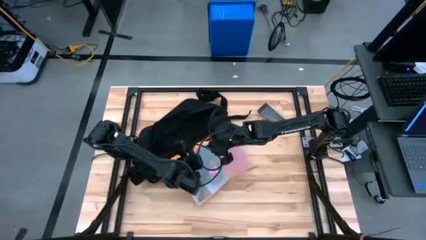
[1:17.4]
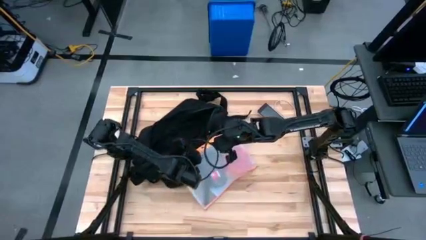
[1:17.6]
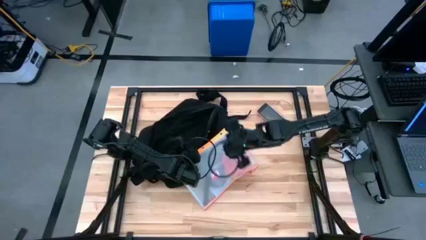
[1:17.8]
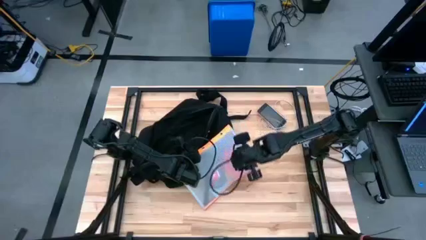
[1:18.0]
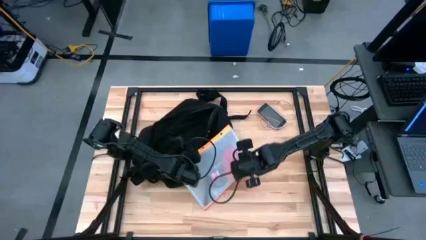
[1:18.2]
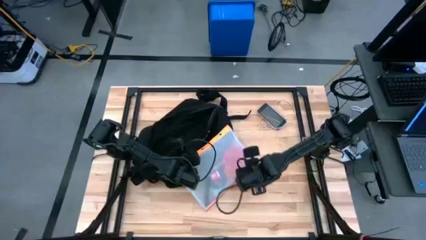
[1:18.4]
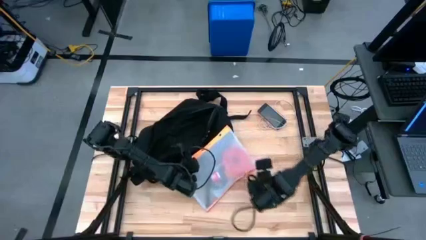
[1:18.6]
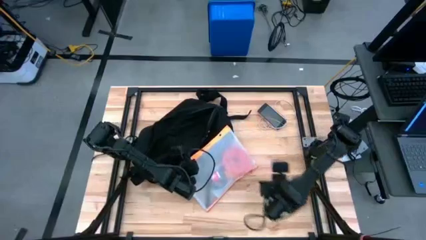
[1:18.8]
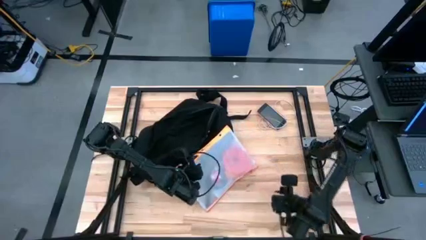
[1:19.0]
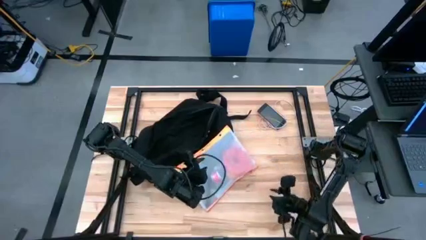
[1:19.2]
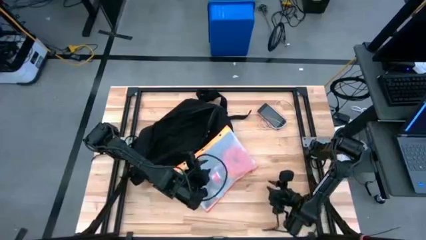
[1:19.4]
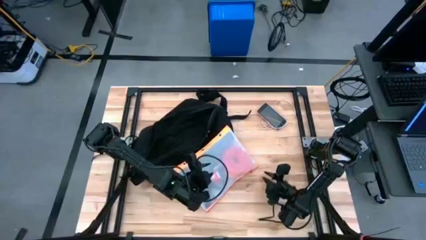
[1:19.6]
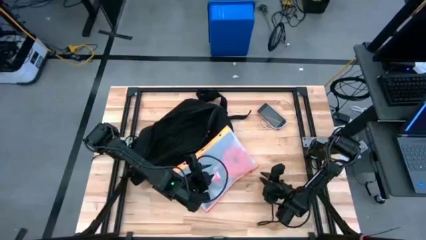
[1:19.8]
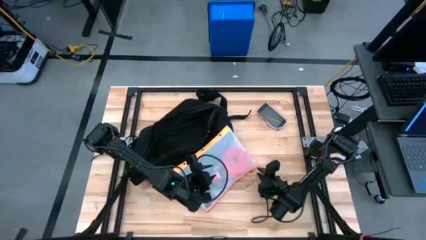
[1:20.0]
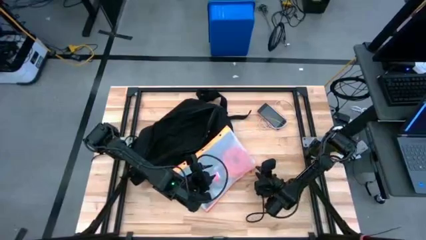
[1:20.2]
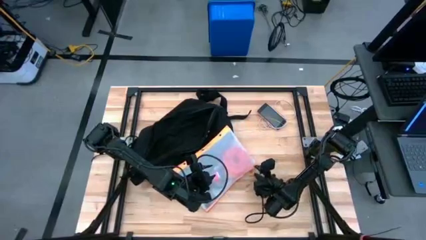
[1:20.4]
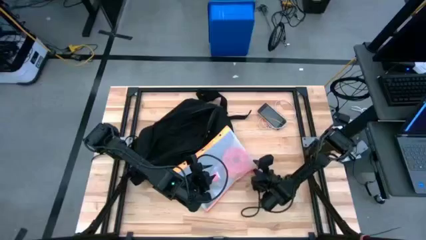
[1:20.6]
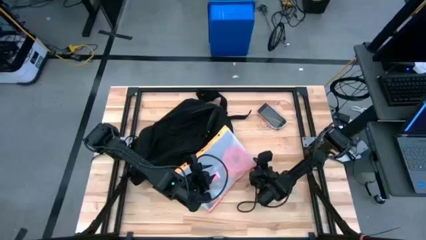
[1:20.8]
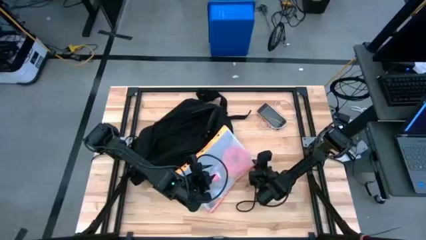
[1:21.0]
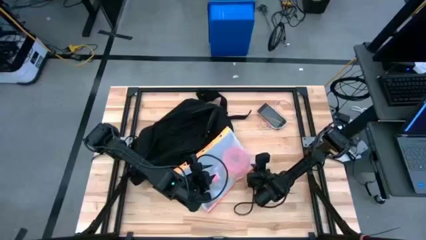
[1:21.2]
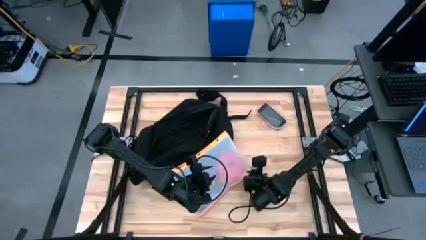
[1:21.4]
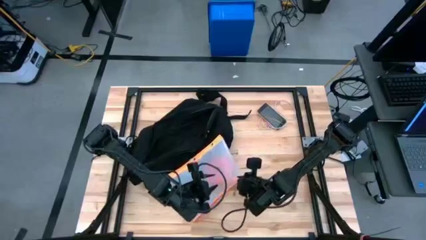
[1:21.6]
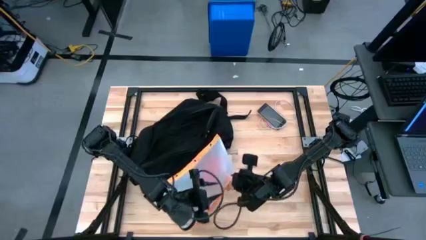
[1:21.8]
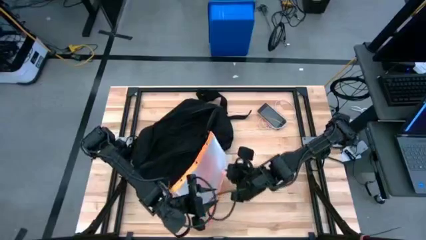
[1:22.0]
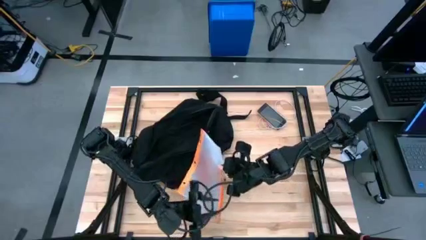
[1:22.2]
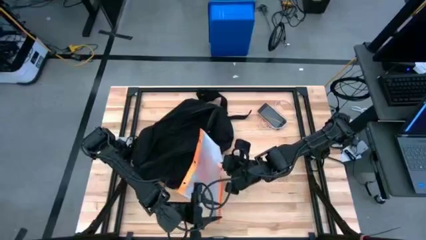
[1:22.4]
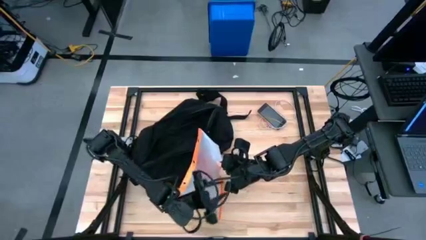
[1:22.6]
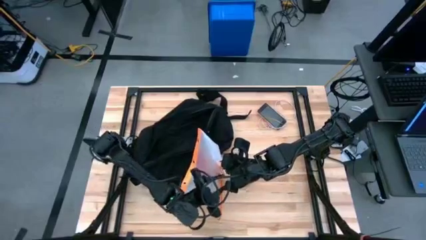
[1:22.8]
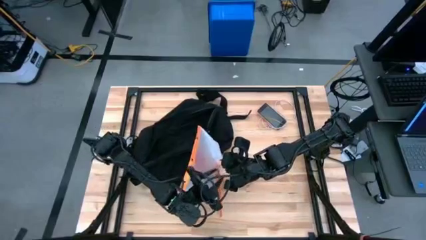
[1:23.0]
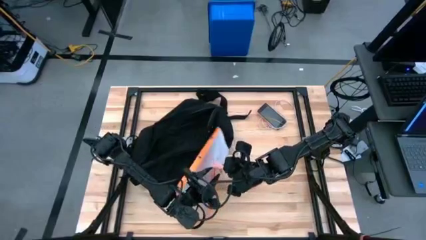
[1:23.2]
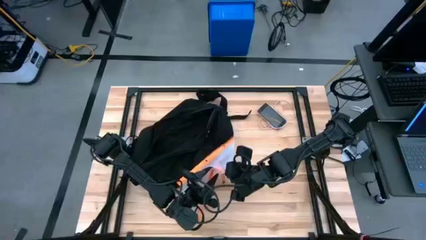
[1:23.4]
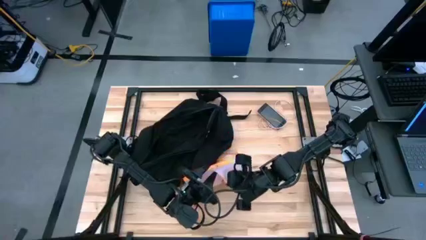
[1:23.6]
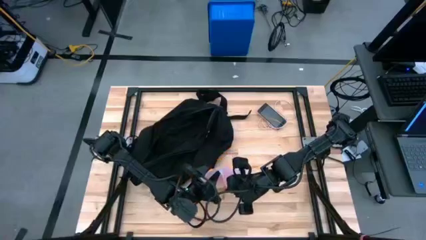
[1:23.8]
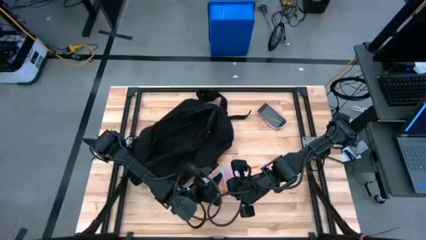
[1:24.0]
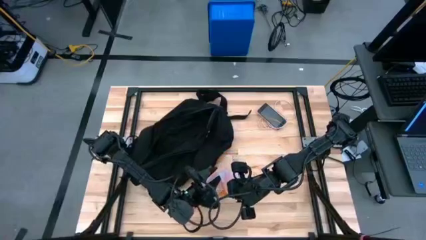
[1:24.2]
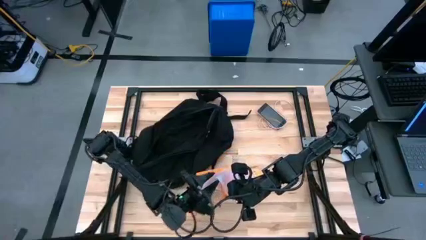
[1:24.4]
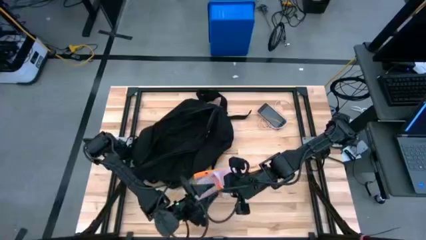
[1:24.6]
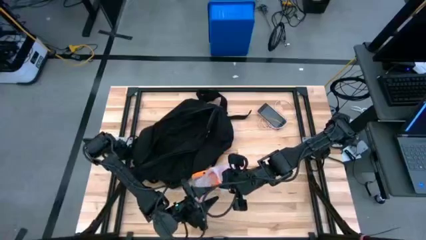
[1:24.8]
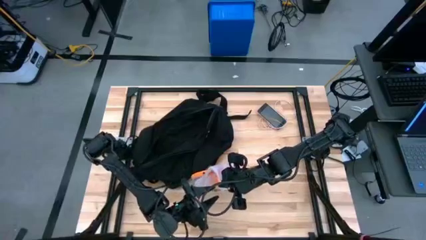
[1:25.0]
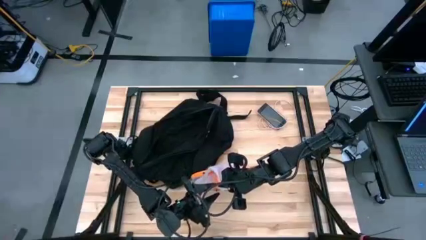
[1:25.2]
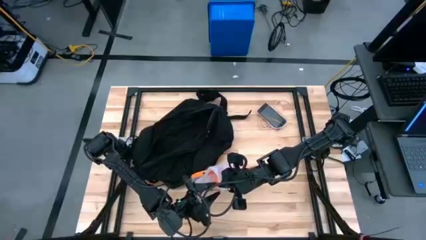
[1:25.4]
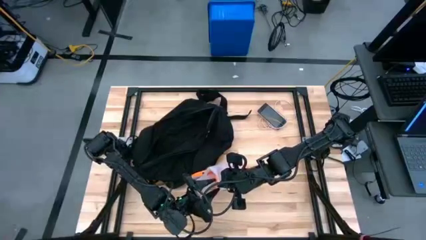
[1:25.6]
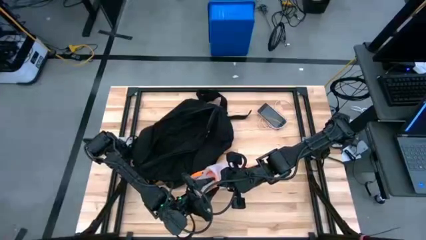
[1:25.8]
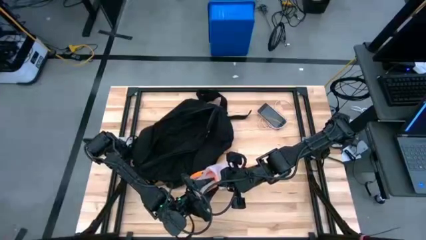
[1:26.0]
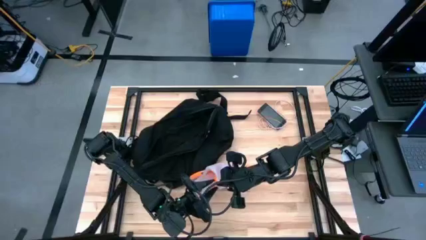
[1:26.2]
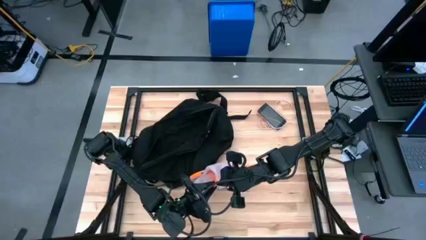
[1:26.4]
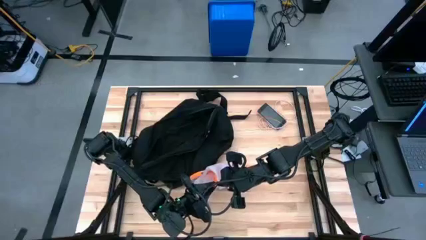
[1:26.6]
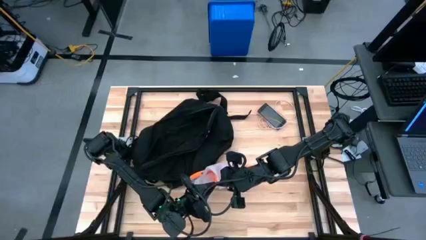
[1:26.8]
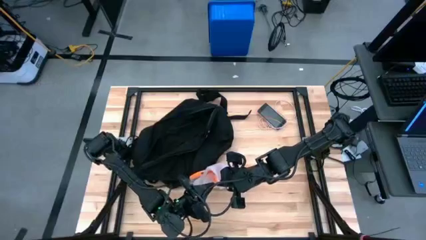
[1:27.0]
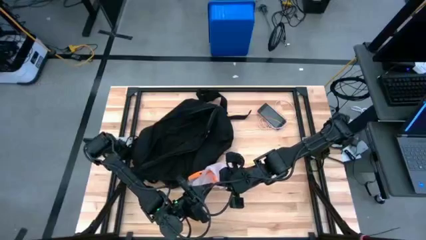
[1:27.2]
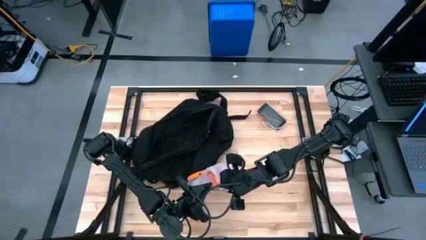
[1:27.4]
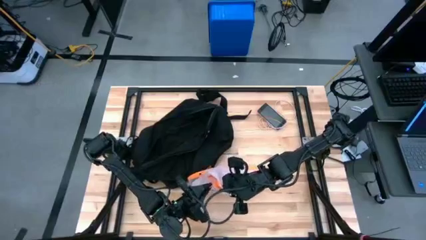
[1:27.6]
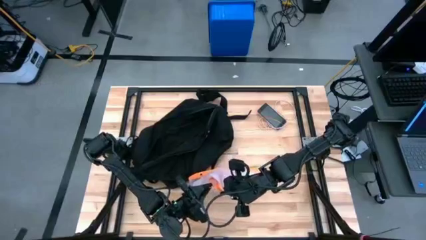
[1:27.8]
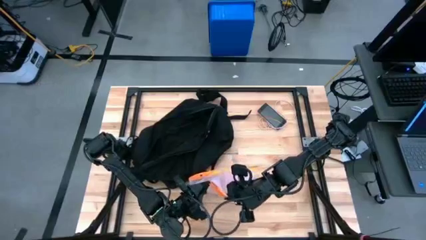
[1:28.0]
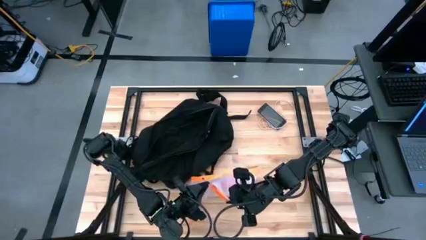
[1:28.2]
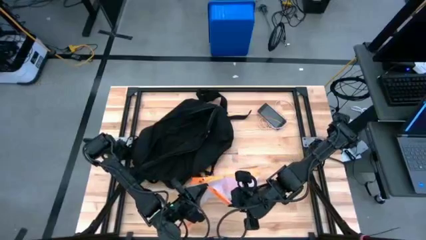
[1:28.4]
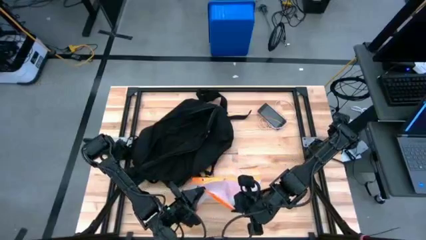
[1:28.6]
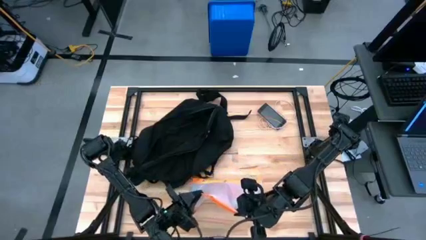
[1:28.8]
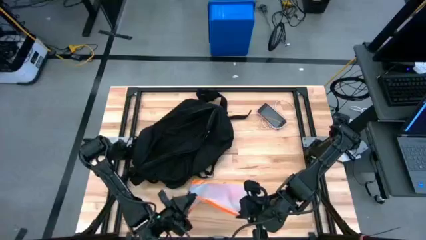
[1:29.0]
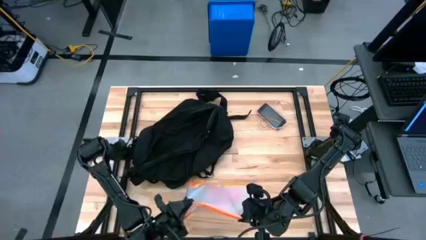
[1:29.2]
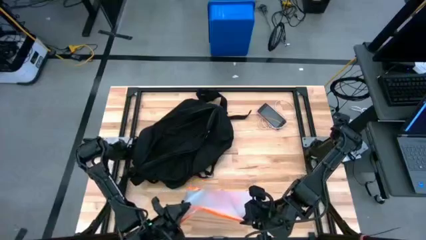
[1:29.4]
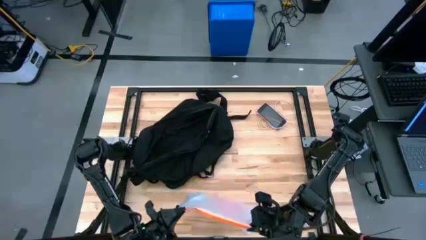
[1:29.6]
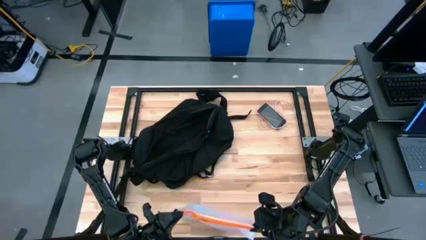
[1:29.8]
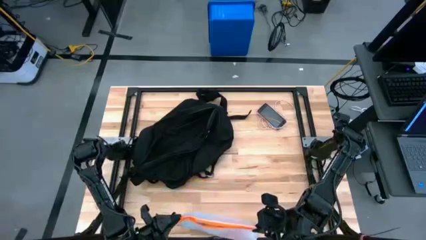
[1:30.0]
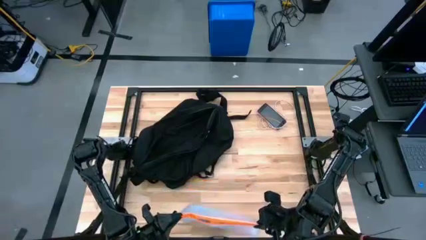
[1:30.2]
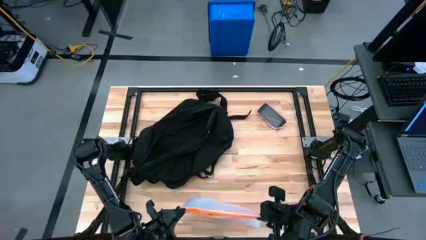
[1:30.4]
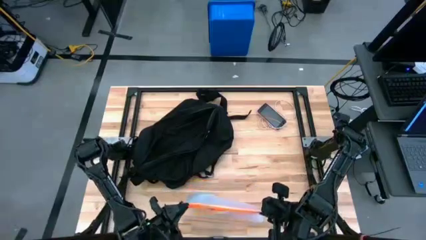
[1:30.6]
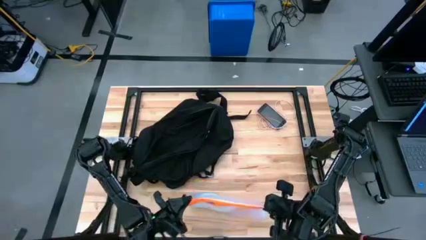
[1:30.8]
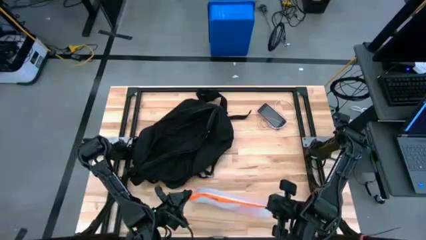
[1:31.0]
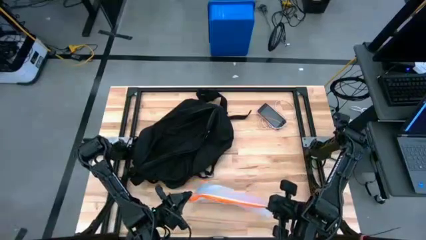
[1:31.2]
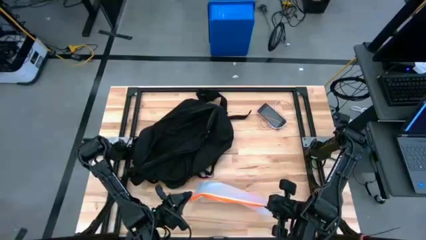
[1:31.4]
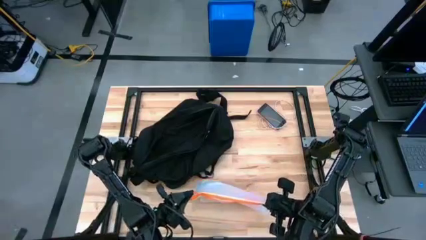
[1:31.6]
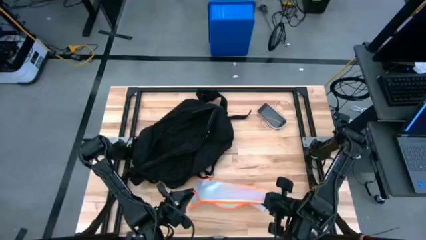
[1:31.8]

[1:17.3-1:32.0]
Task: Unpack backpack
Open the orange zip bag

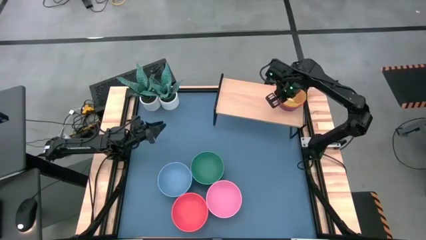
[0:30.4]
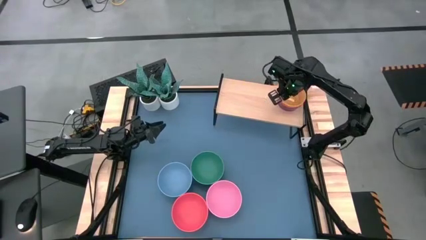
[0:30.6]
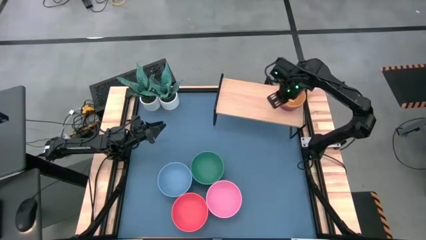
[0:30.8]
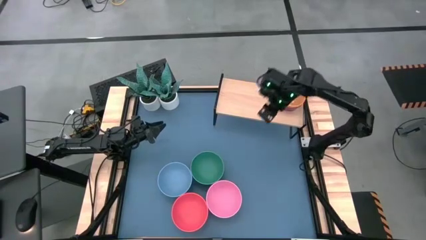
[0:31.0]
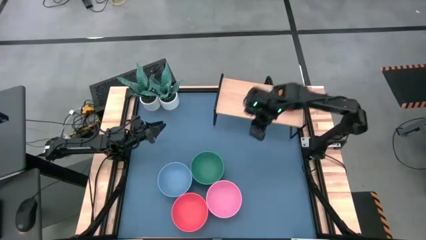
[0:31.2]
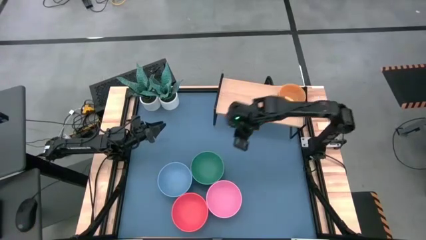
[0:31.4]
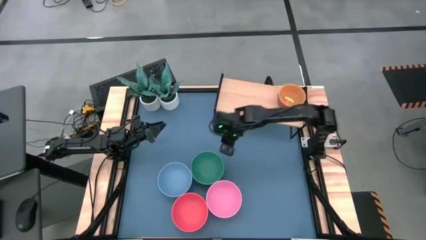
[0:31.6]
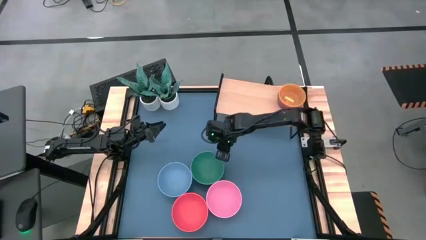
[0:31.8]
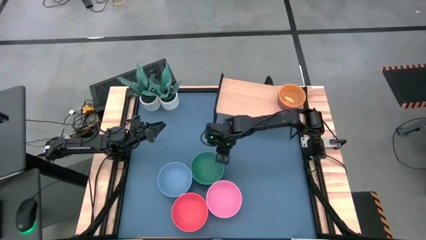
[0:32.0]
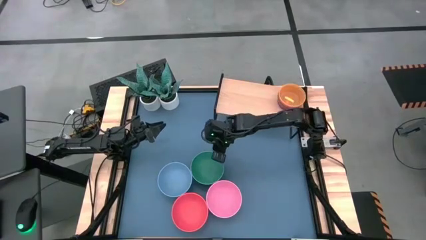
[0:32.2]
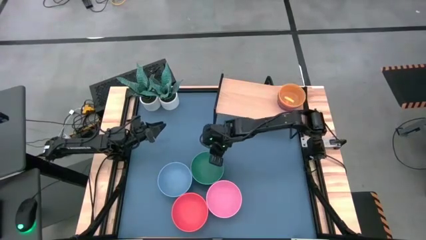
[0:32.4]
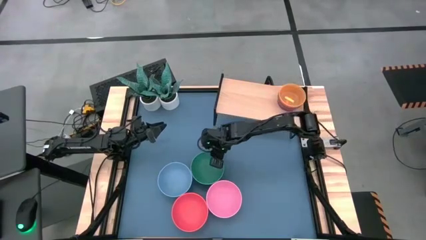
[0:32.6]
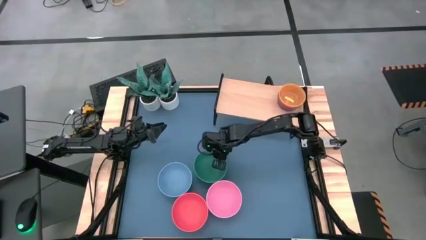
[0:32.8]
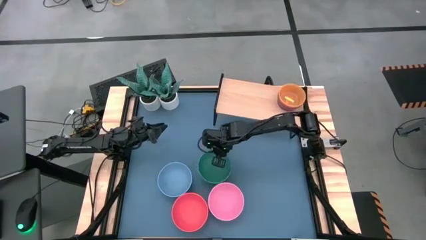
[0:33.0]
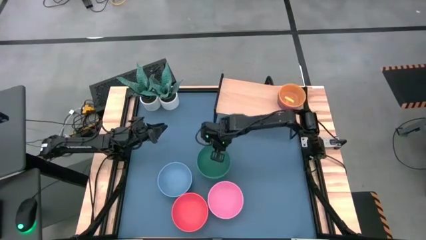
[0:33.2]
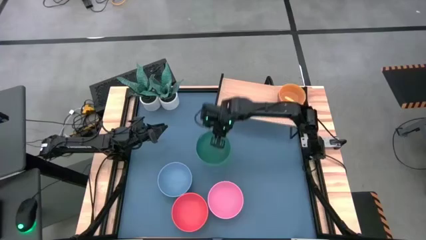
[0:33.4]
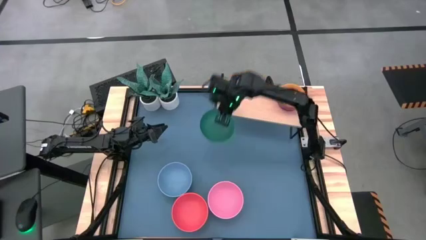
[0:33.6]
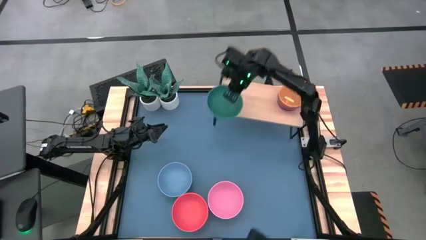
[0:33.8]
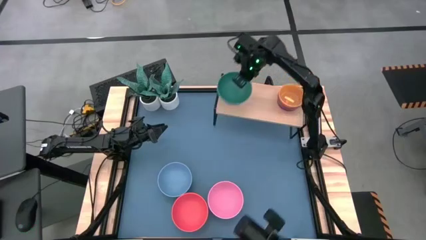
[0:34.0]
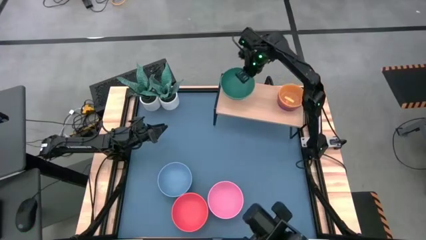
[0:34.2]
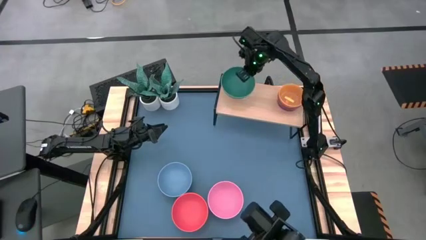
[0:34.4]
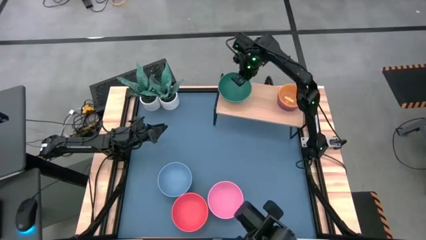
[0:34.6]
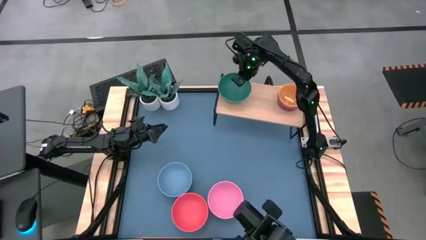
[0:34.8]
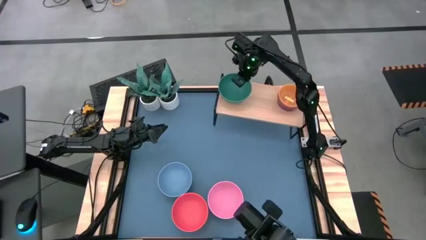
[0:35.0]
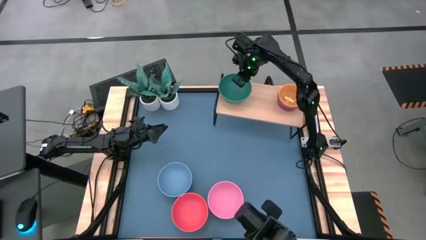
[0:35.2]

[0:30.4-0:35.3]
Task: Place and stack bowls onto a shelf
Put the big green bowl on the shelf
